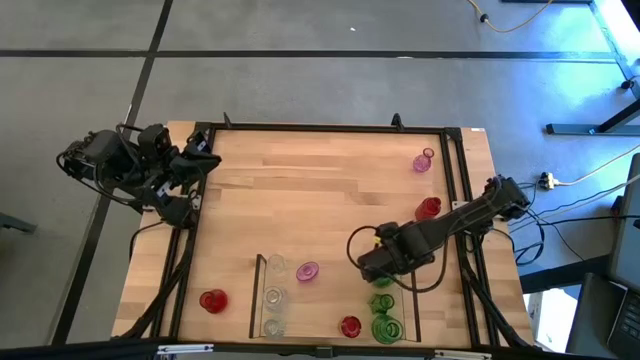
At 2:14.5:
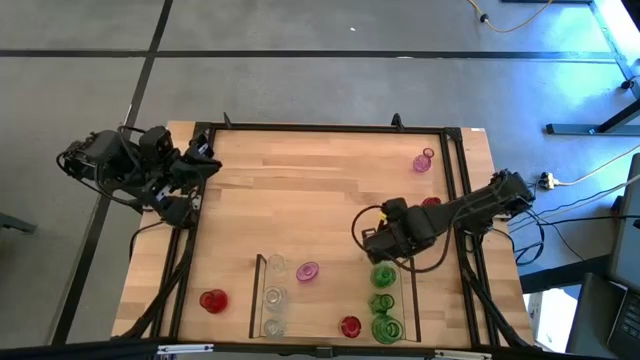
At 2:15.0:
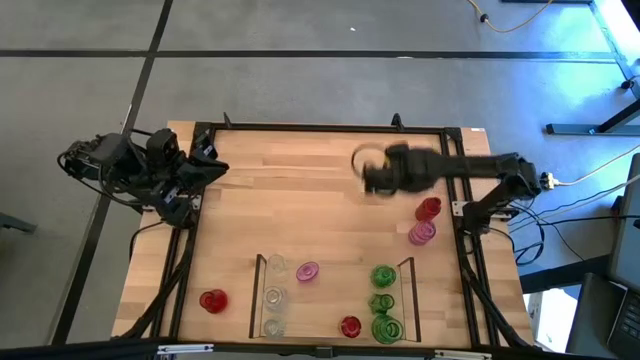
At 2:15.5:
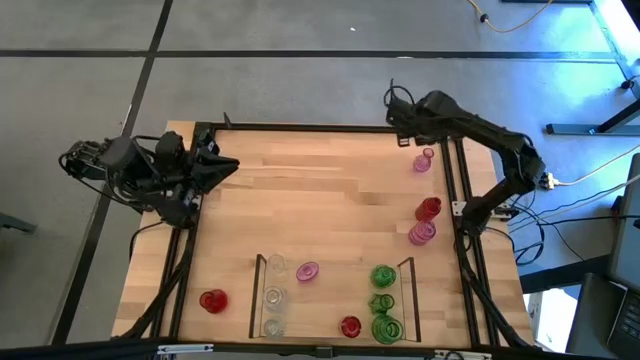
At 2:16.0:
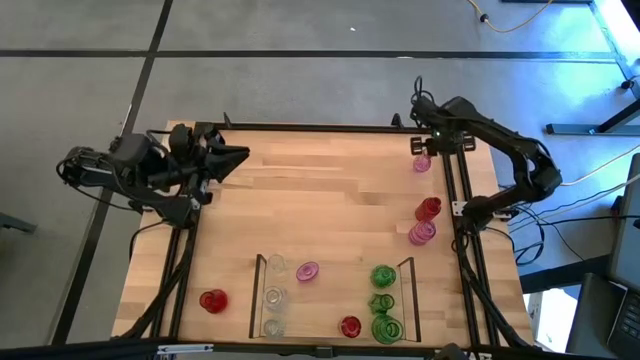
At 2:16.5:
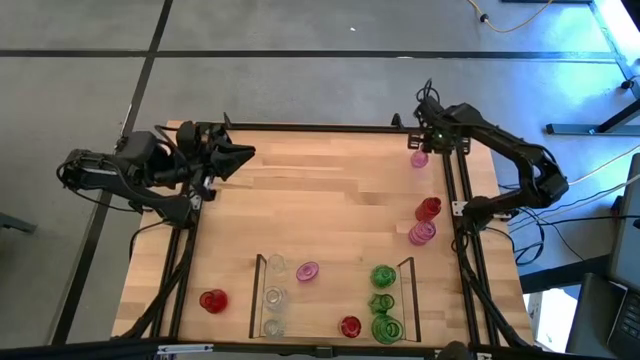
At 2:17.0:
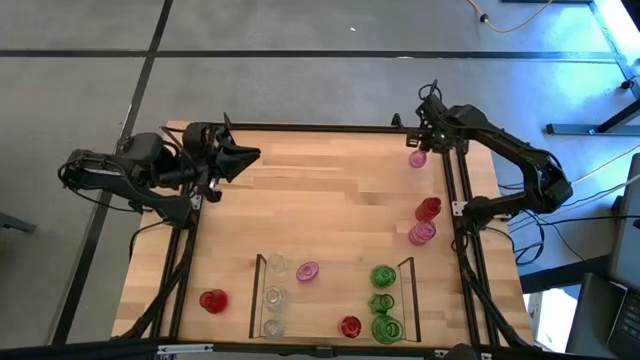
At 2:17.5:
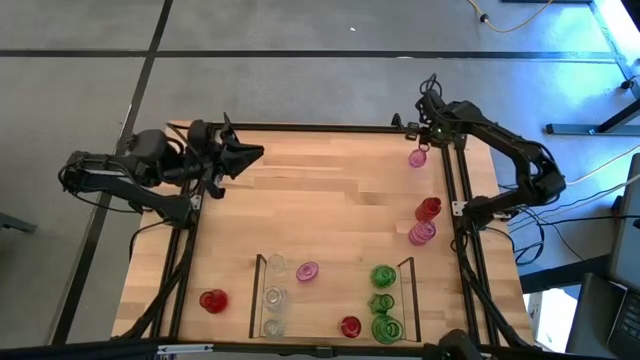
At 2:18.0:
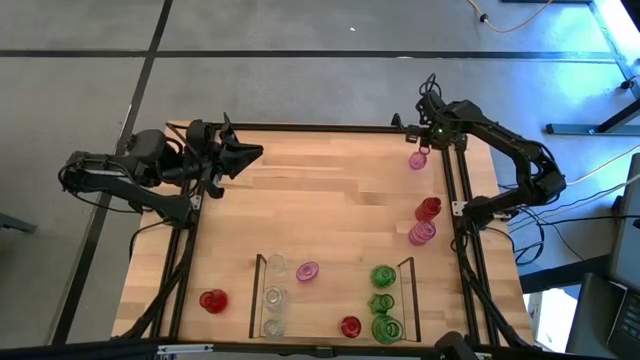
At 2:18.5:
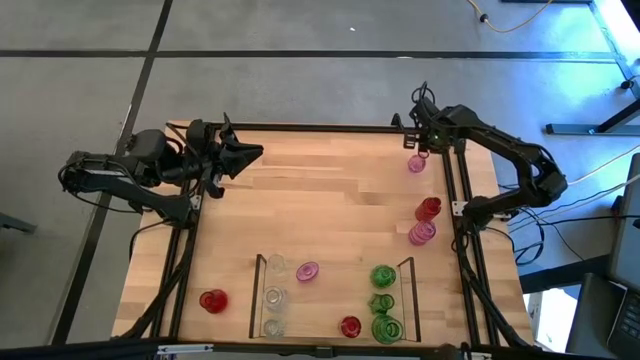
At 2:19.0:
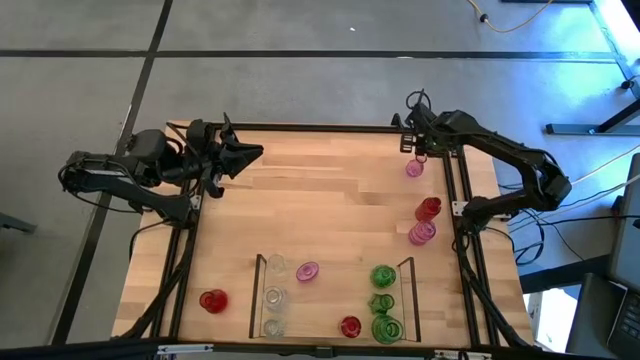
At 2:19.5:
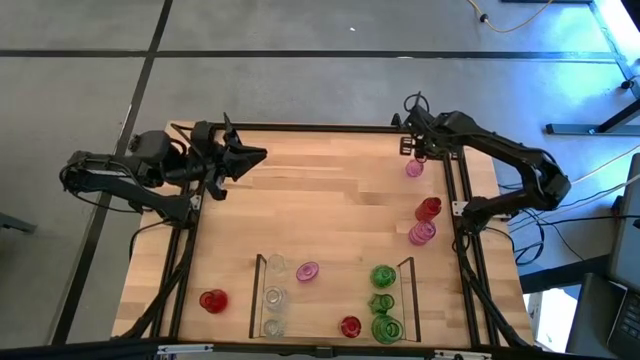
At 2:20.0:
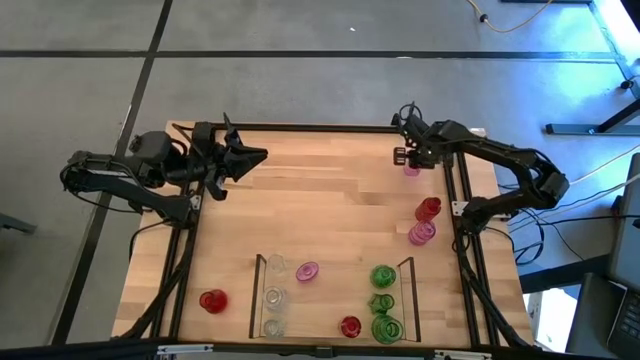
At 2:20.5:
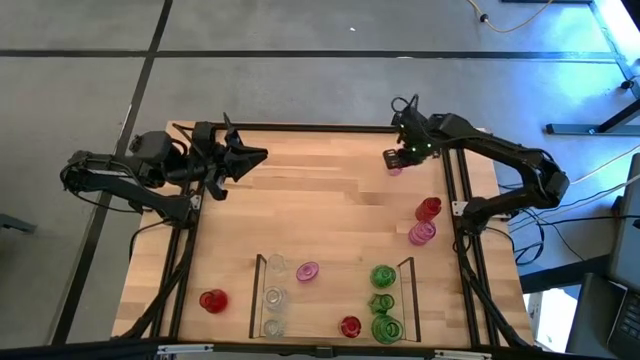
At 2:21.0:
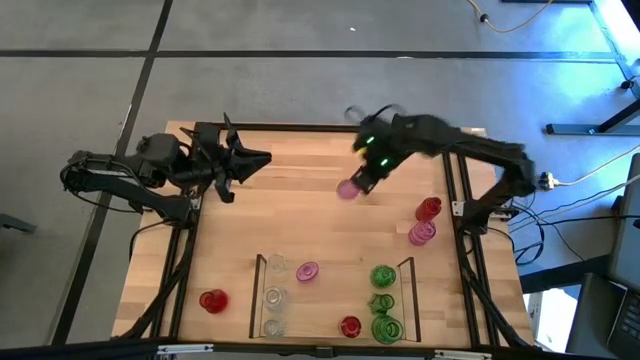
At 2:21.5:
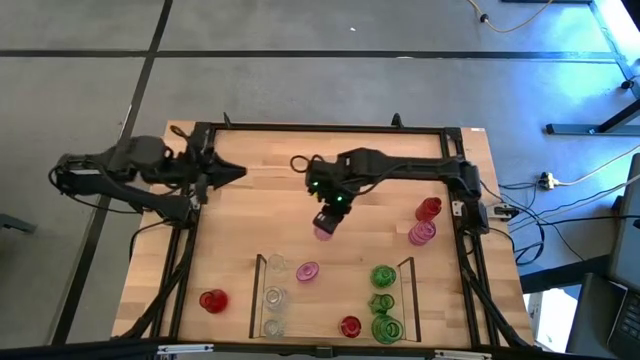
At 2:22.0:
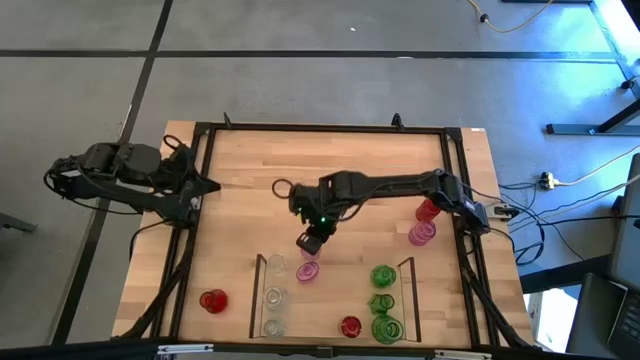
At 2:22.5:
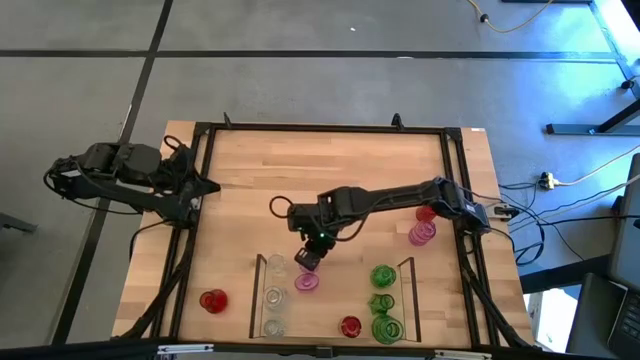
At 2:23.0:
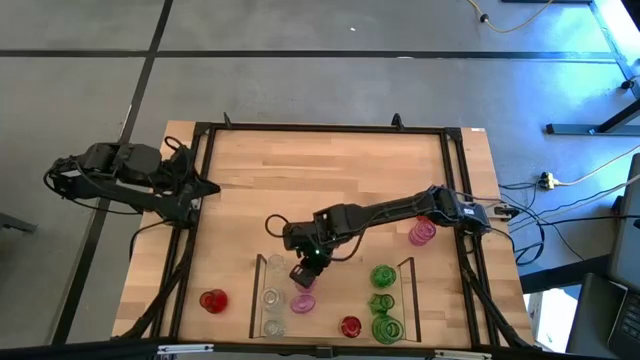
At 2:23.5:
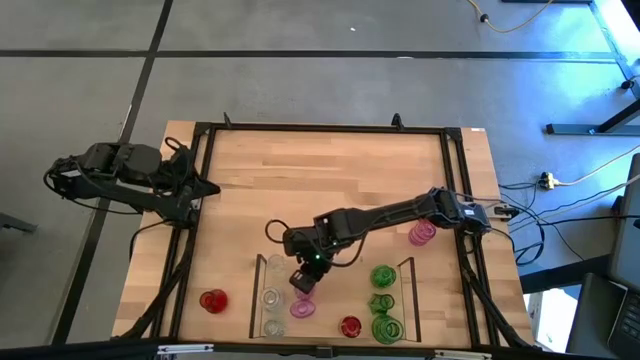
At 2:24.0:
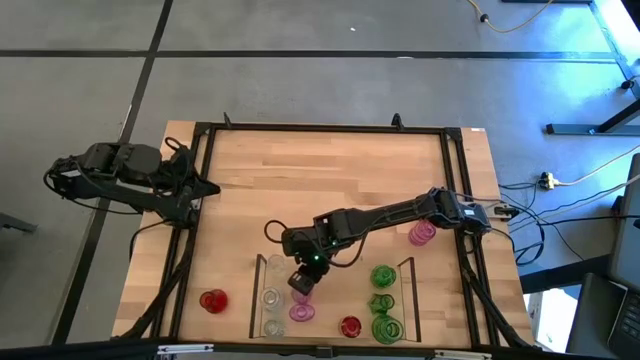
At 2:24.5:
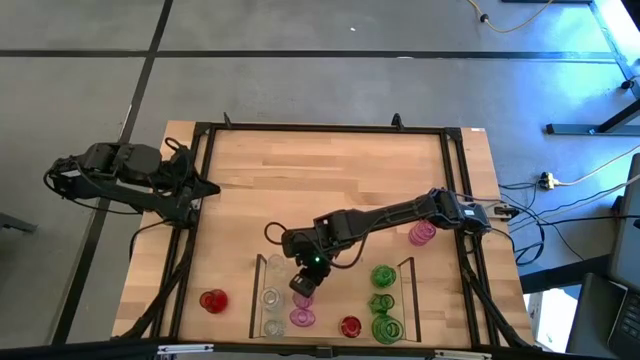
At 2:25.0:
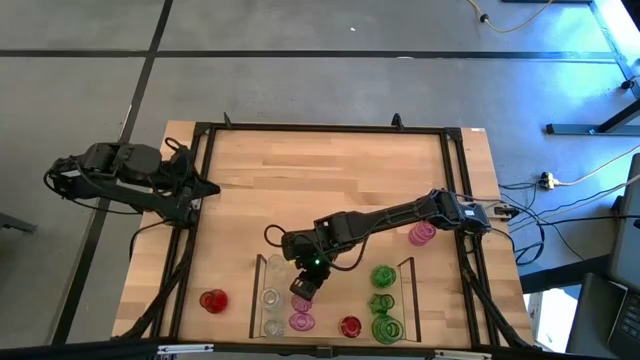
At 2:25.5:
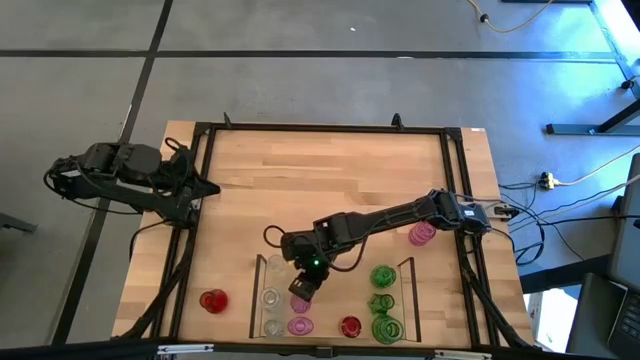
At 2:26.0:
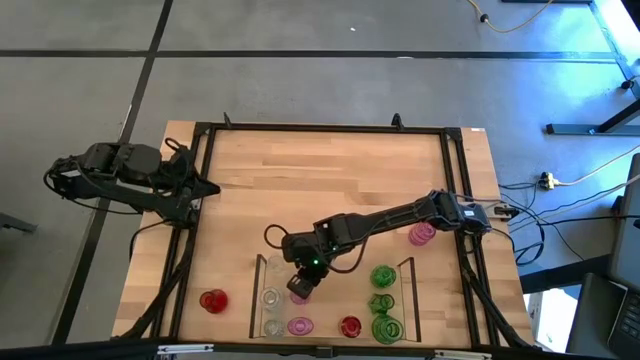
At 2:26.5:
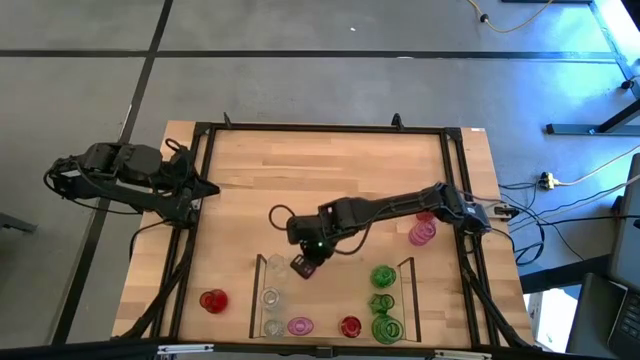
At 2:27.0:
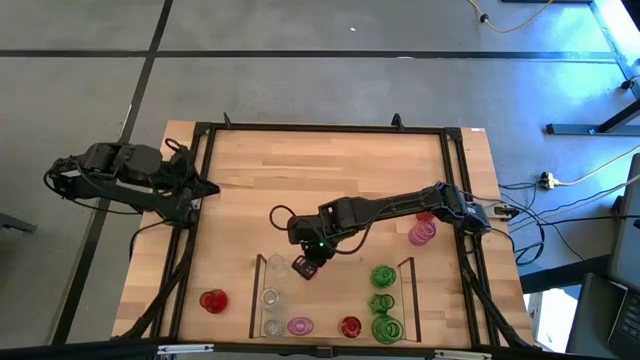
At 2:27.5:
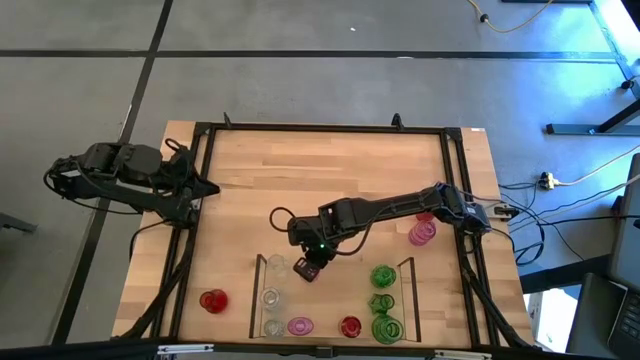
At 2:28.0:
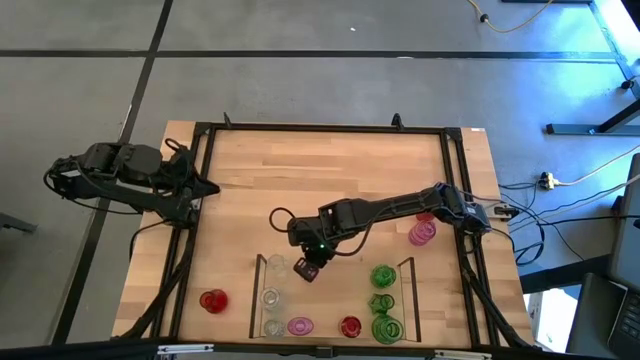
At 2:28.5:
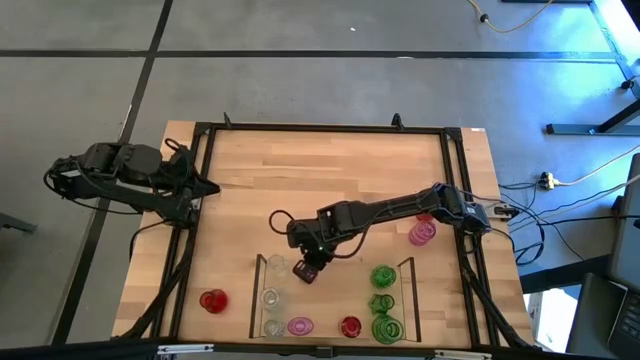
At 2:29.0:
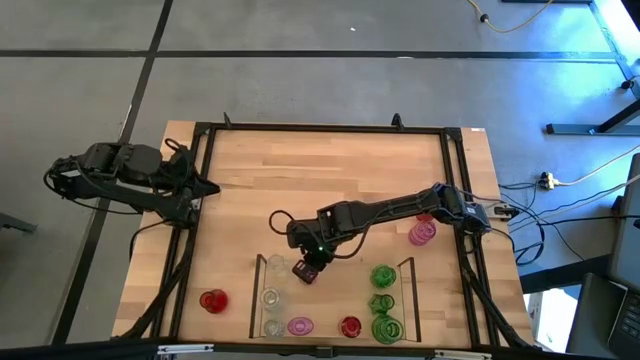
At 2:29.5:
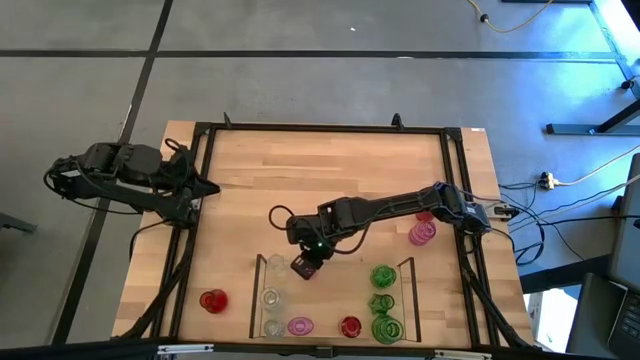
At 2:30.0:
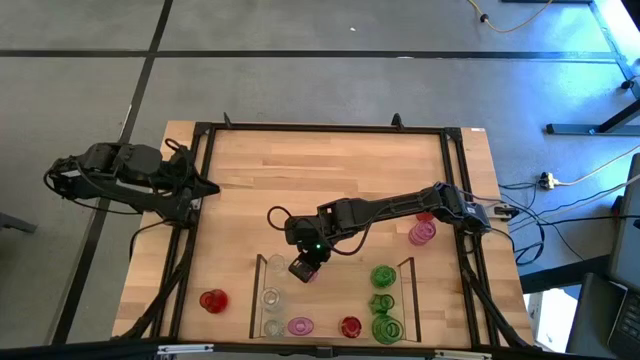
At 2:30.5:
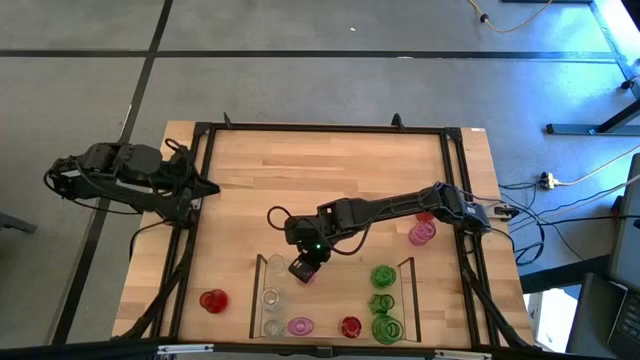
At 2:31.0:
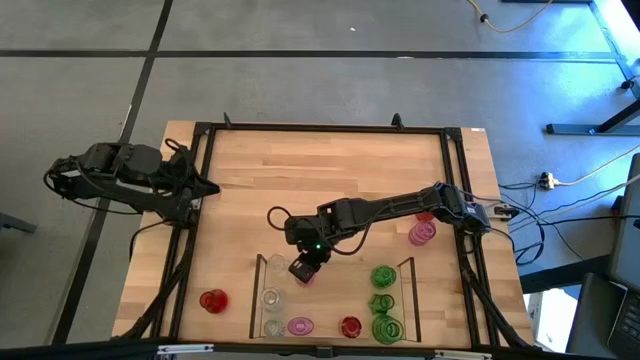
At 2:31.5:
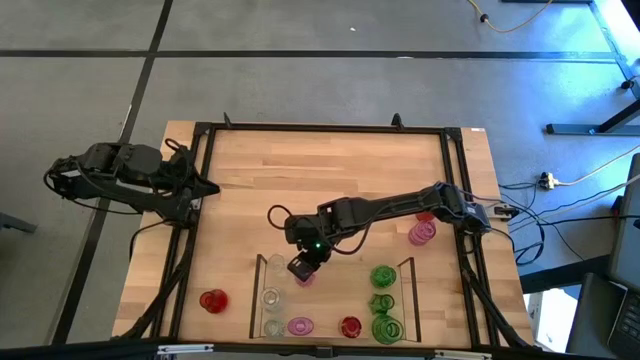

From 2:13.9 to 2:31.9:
Task: sort vases onto shelf
Put the top purple vase aligned with the other purple vases on the shelf

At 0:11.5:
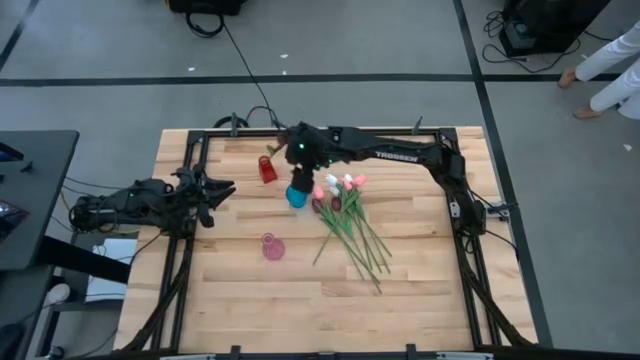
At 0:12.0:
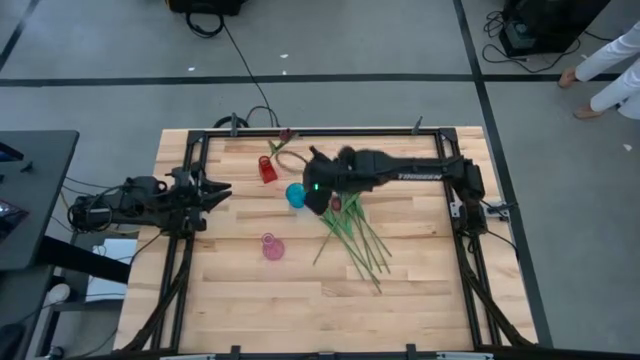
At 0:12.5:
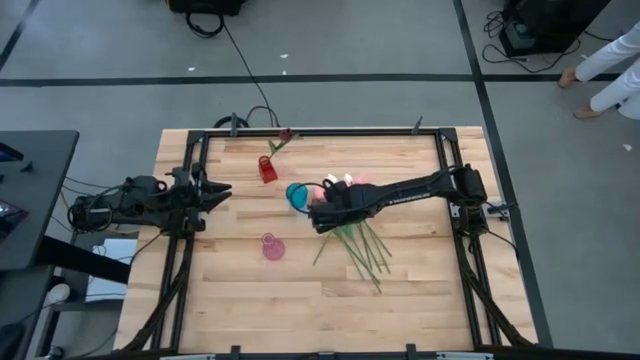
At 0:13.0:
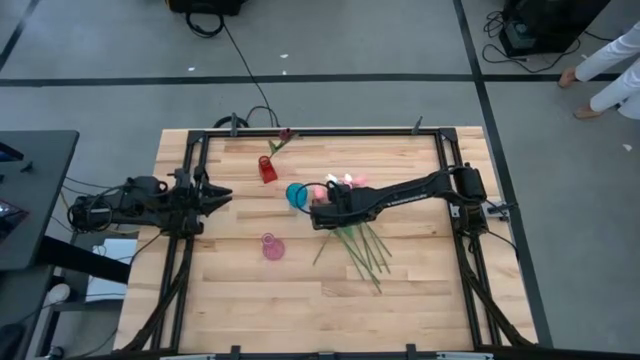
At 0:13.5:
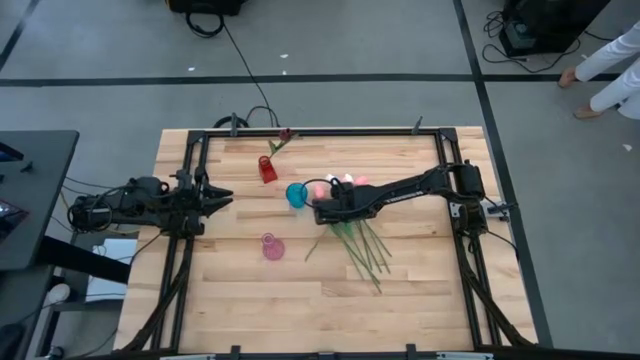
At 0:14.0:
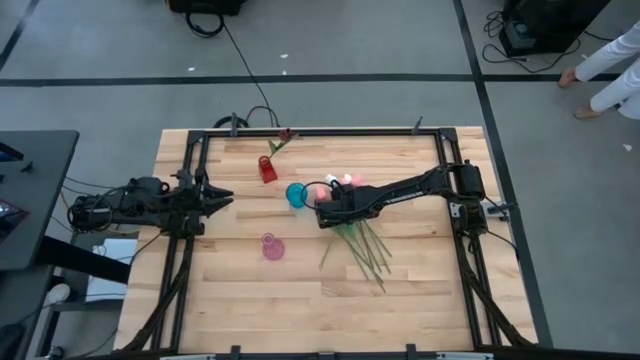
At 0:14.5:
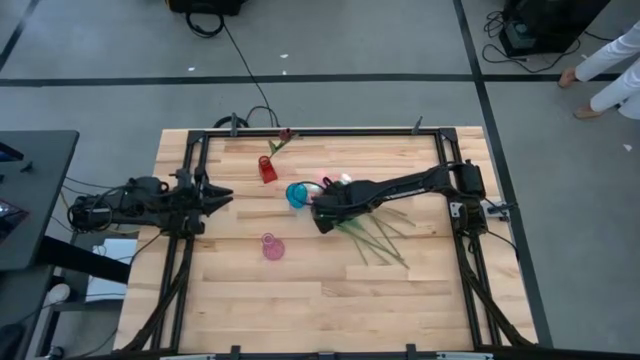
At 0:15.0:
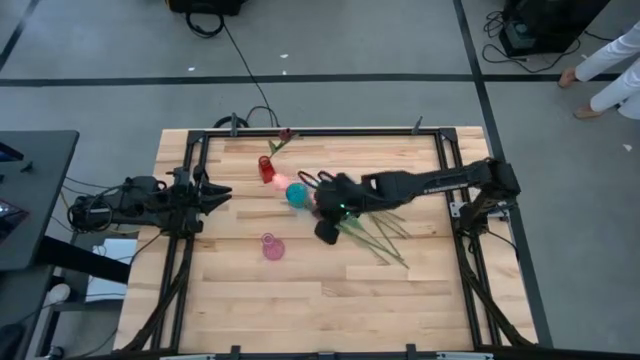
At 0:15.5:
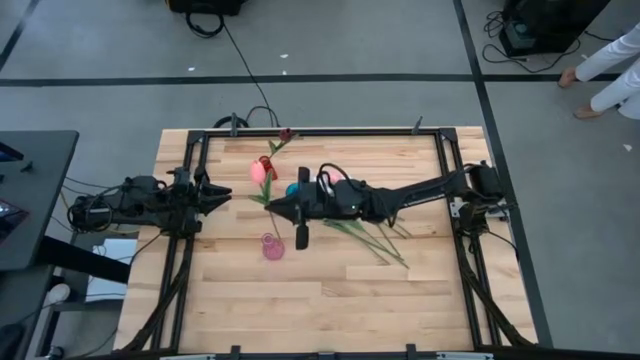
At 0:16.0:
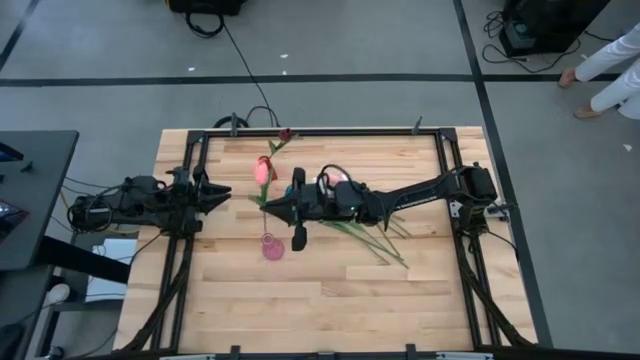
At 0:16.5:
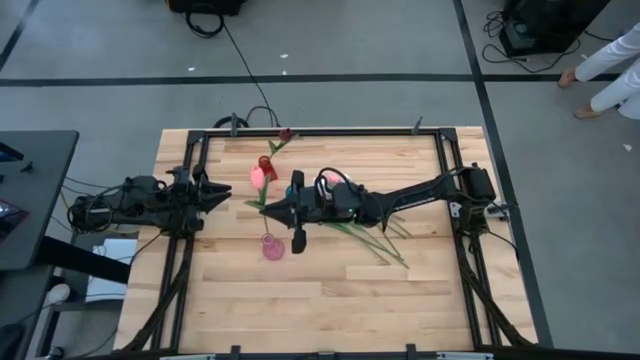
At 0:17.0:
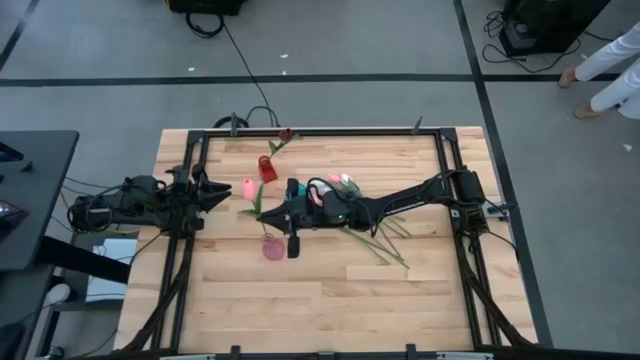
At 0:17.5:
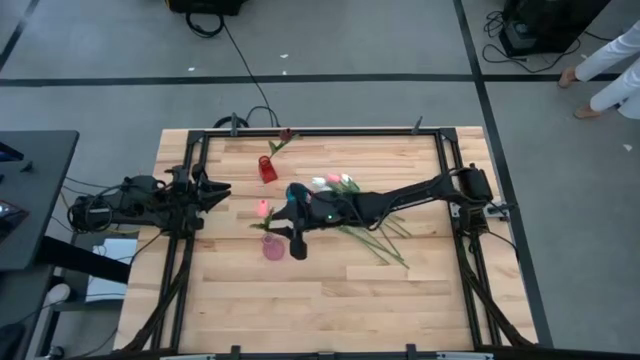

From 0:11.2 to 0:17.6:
Task: Sort flowers into vase by color
Put the center pink flower into the pink vase
